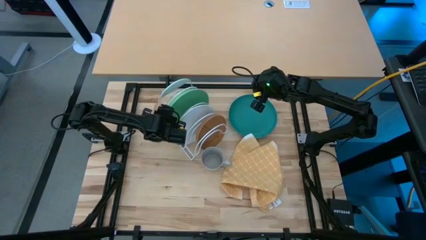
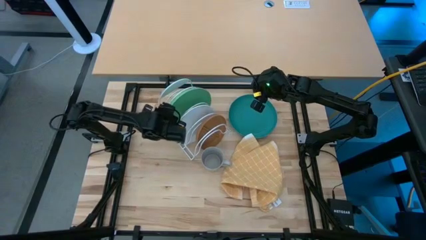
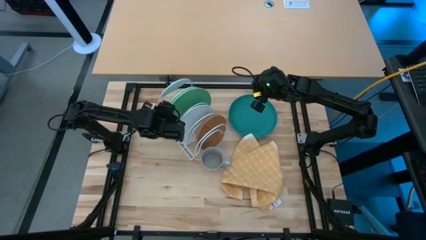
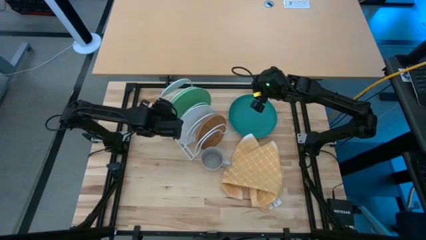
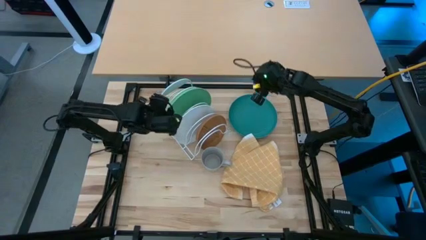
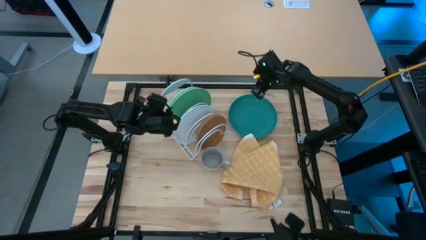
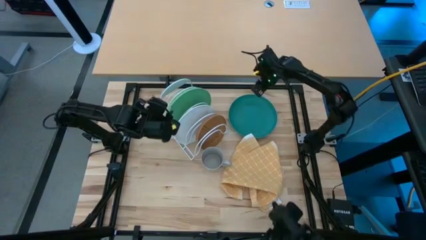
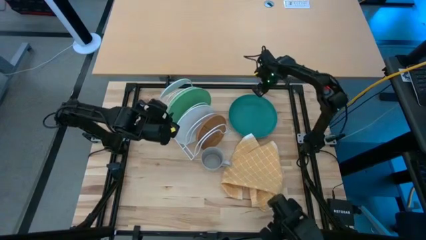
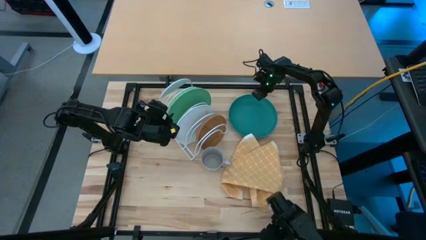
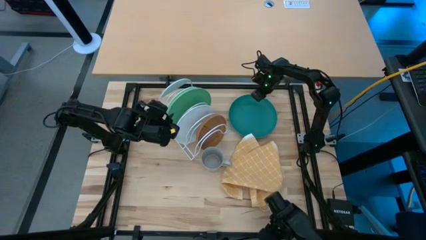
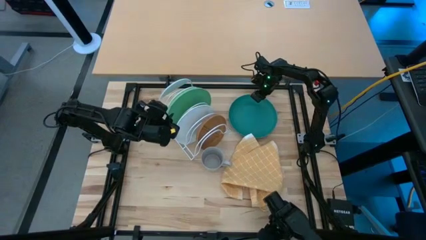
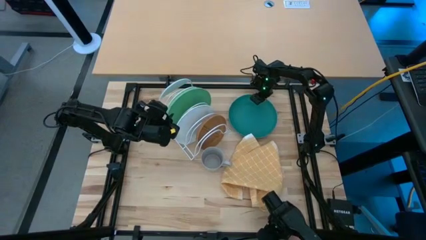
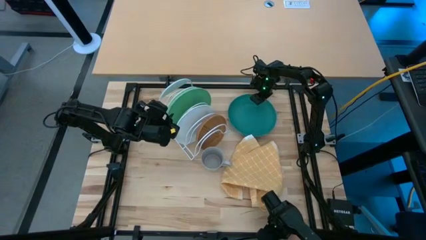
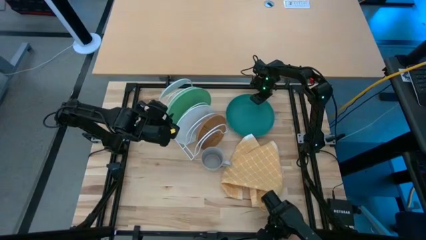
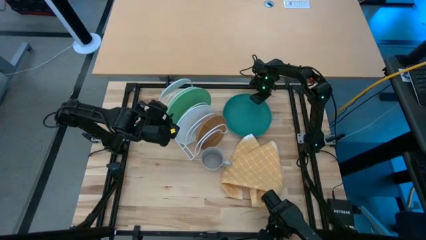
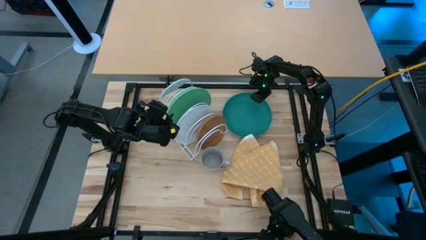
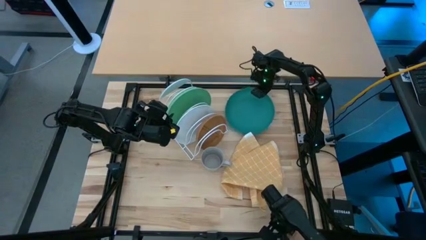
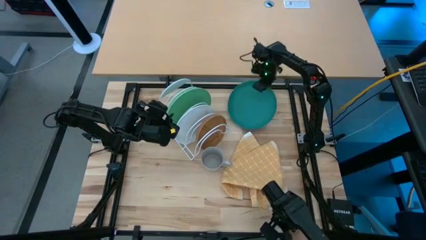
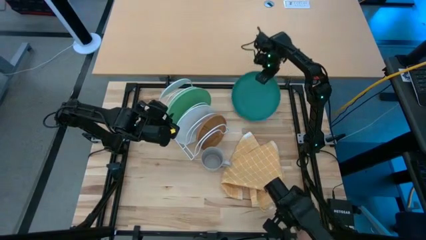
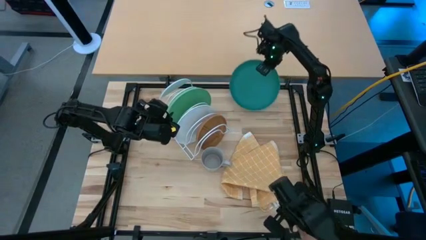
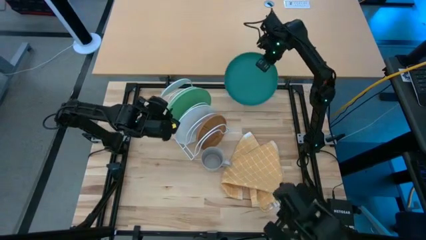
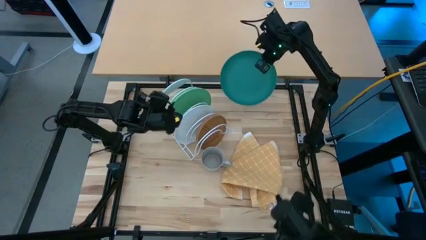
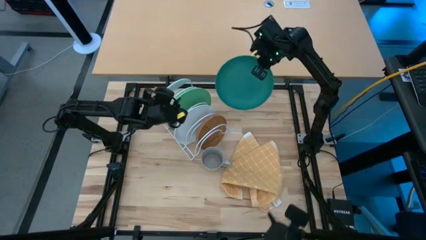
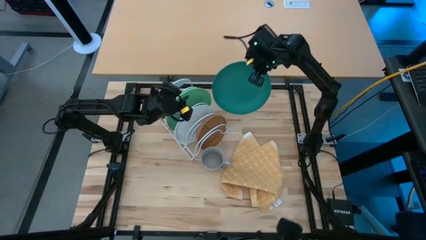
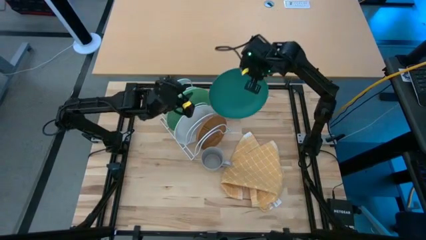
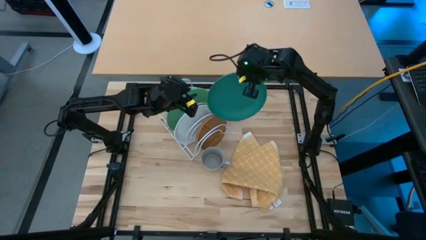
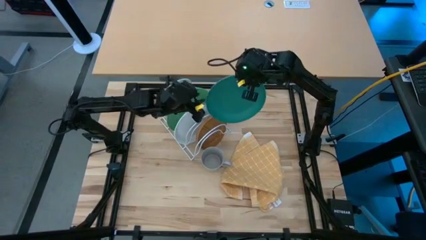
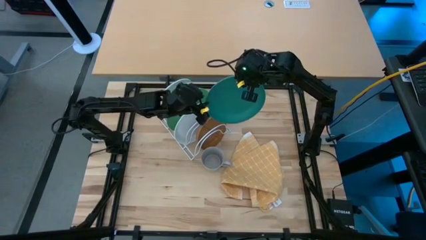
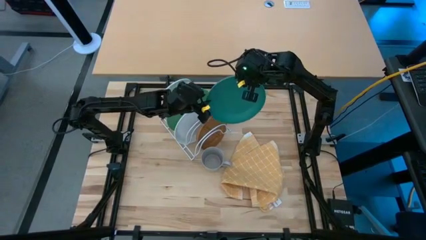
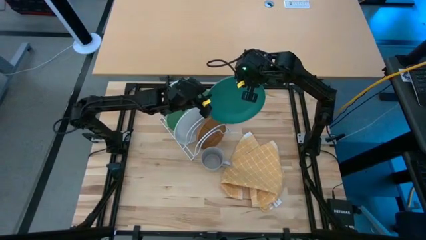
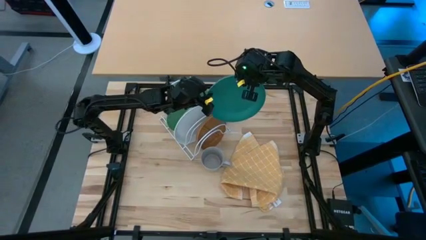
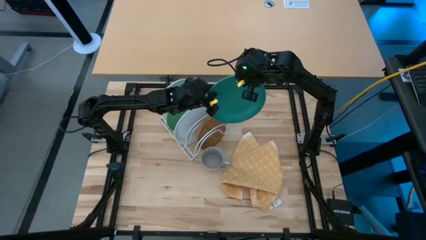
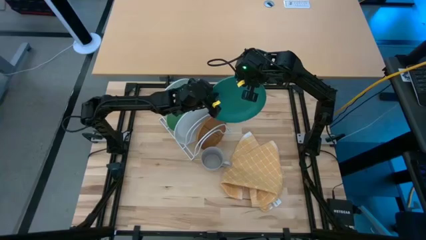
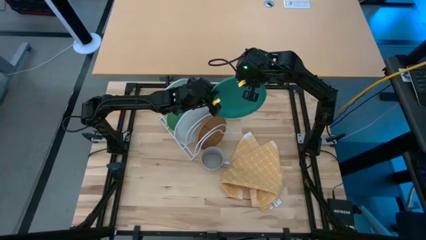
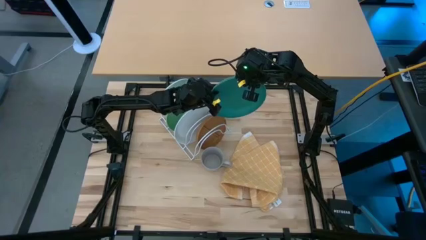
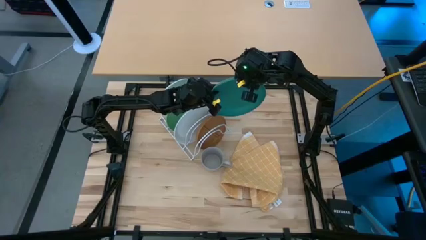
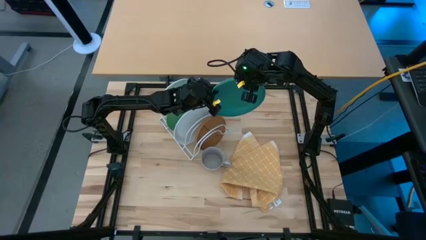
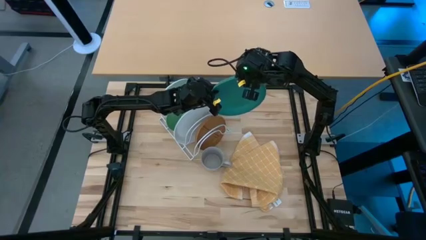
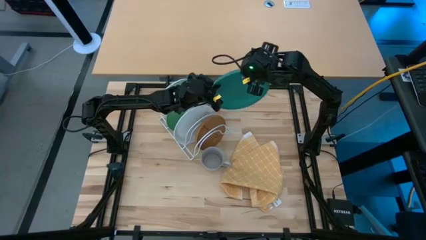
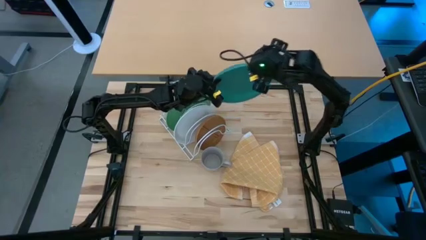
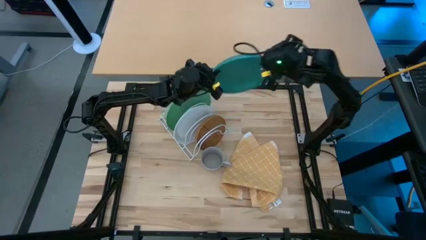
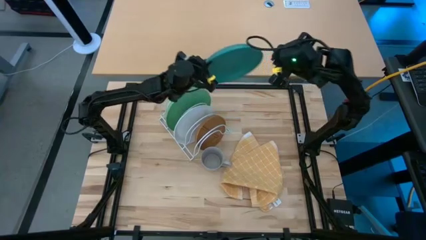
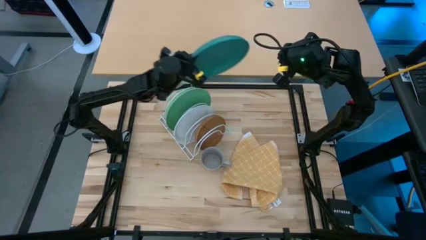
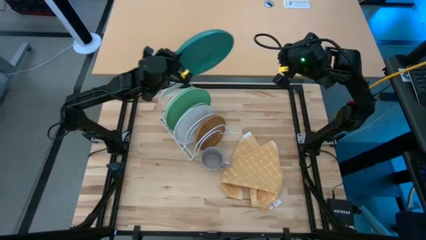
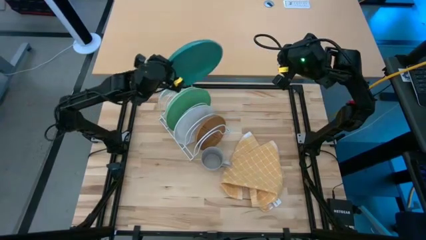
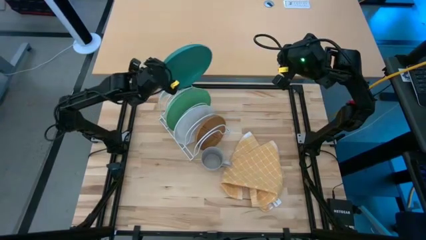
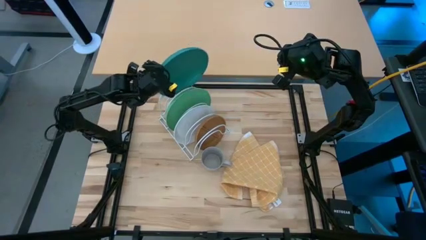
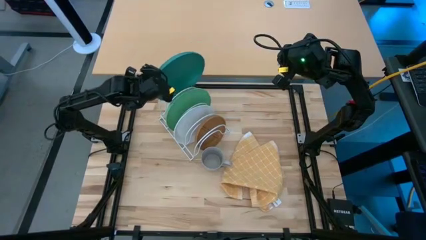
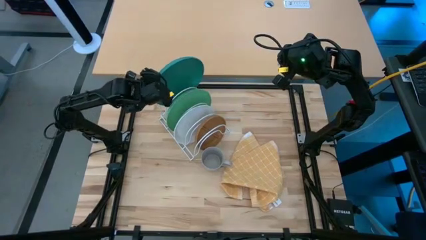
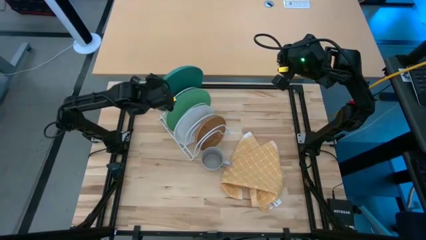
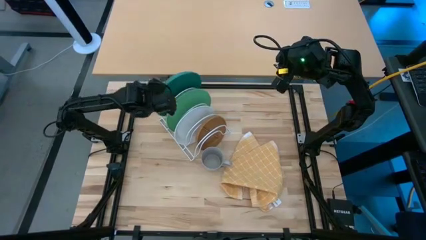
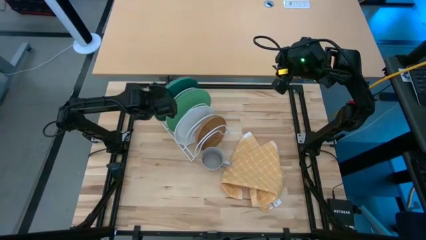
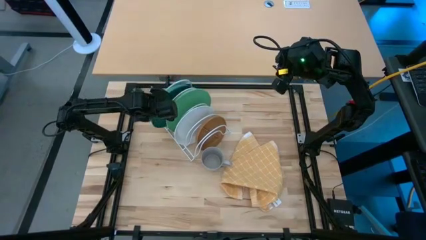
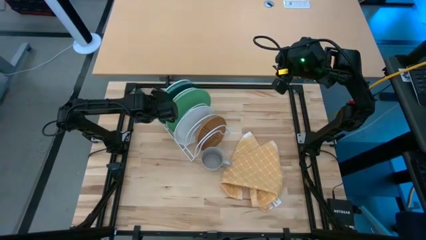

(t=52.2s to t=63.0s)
Task: Sort dishes
Put the blue plate in the dish rack

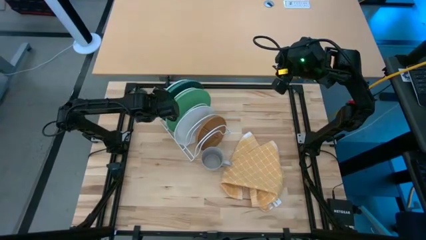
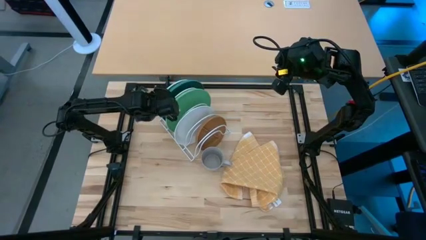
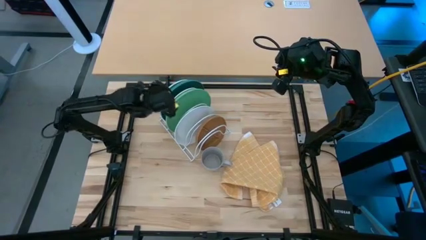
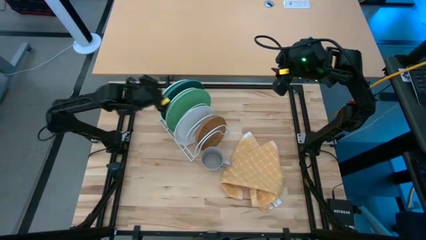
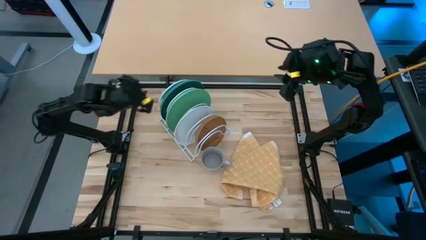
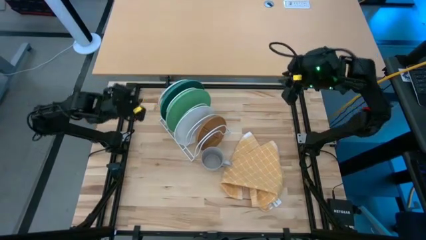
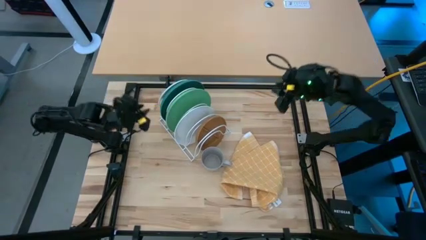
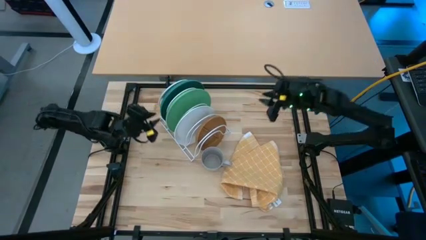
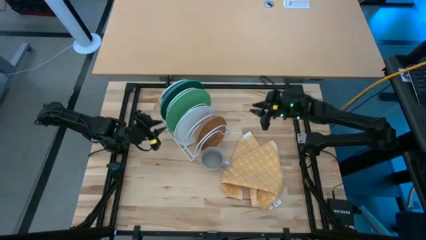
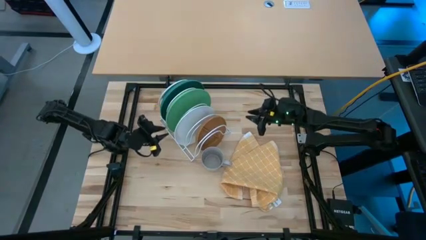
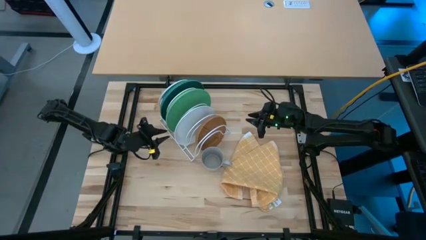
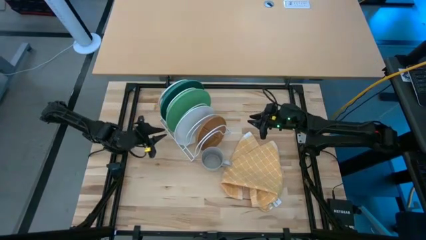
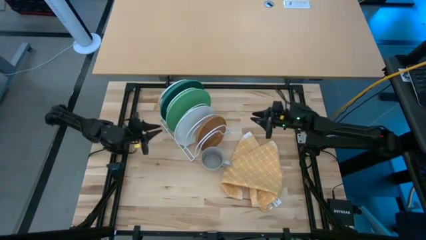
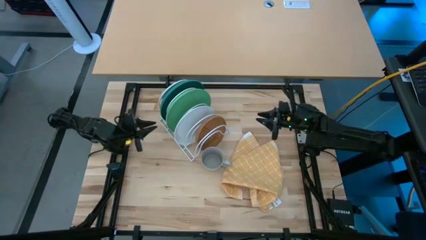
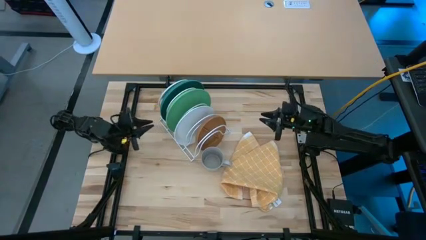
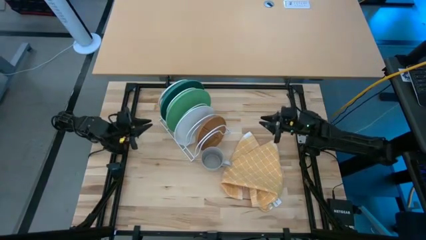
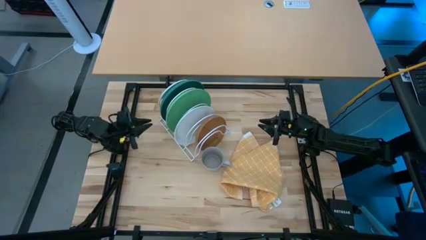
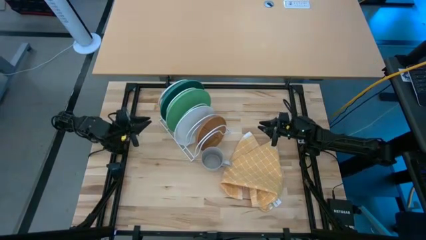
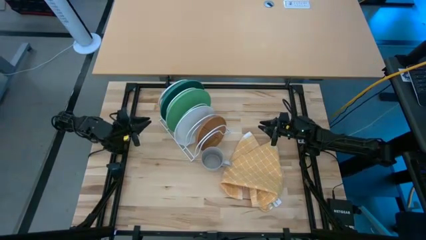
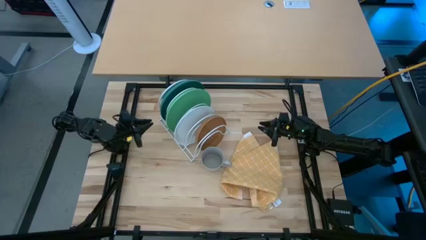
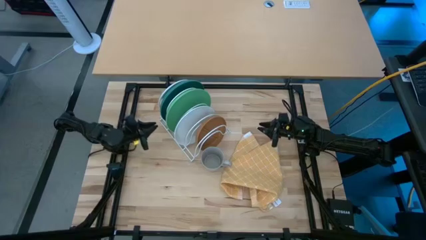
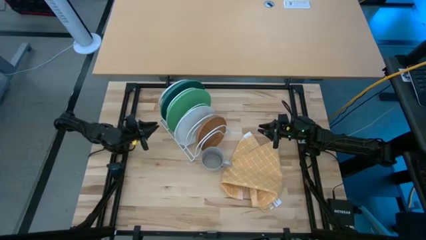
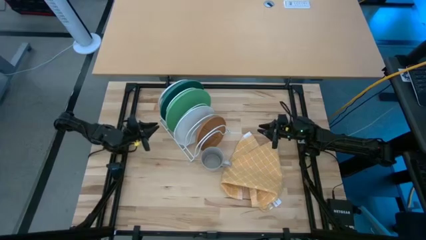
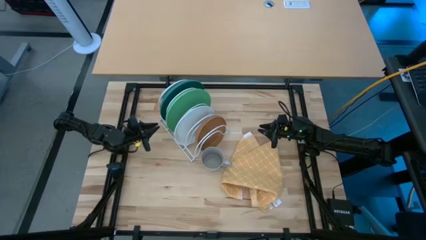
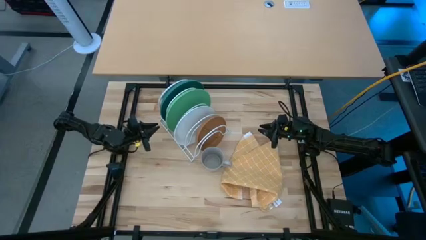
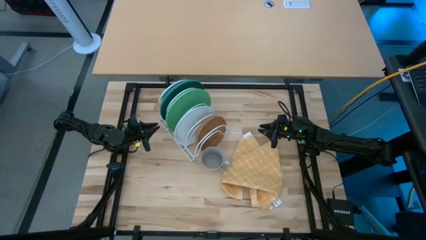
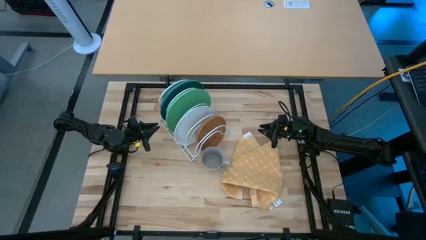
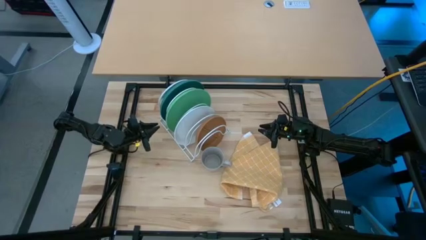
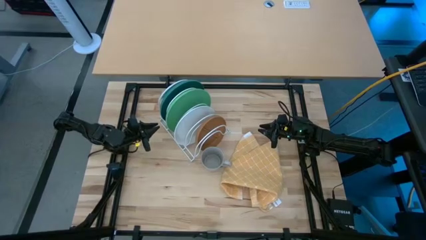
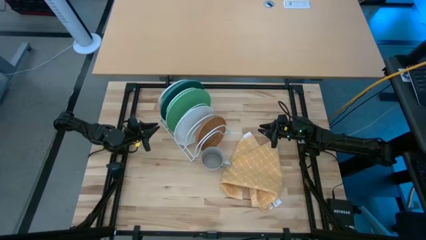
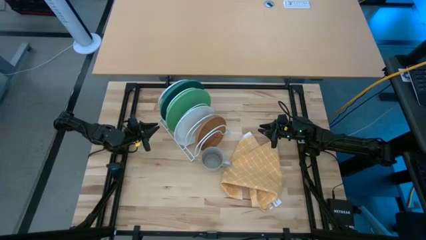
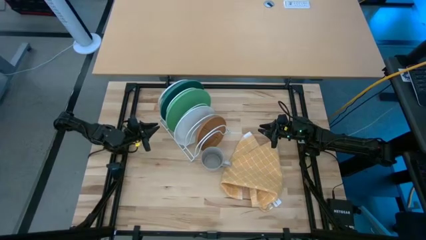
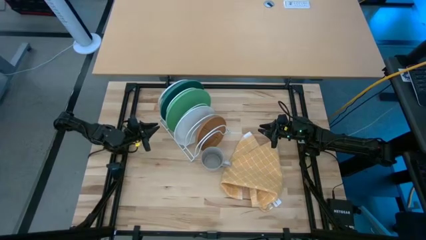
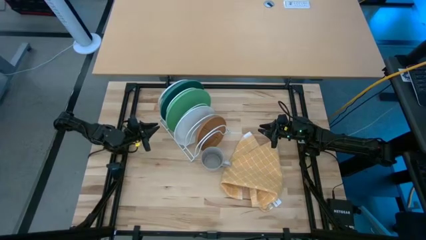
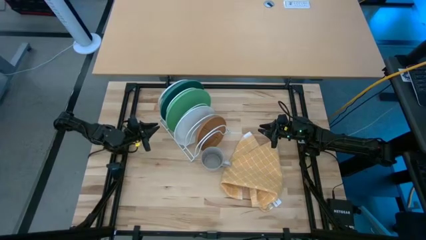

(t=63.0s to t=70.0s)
Return to Home Position
